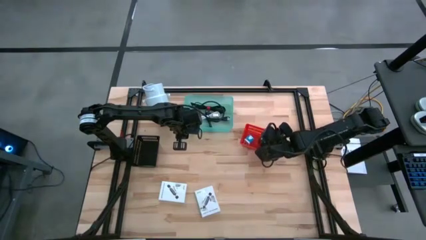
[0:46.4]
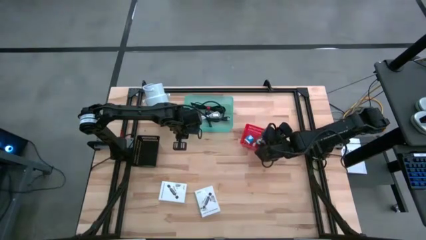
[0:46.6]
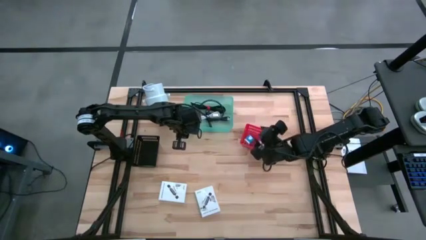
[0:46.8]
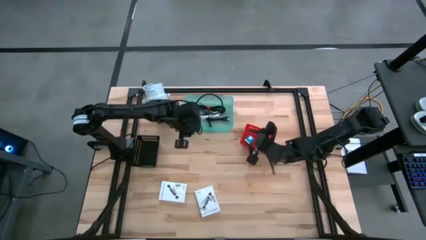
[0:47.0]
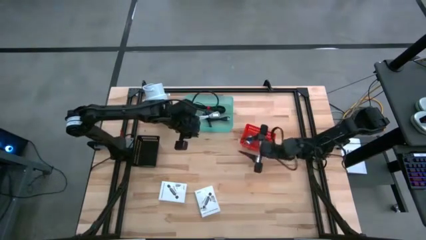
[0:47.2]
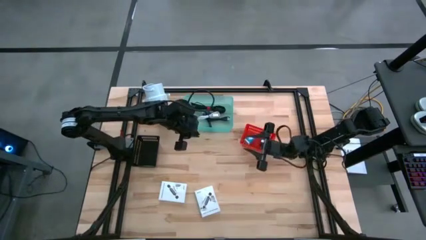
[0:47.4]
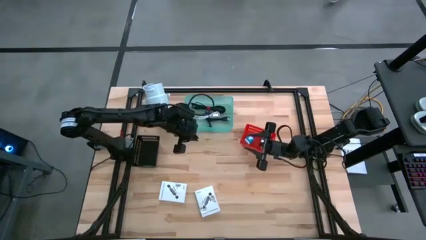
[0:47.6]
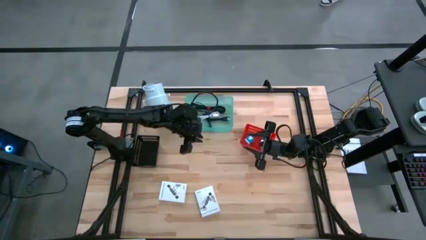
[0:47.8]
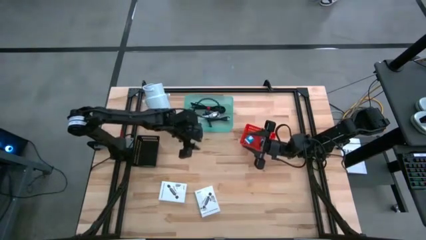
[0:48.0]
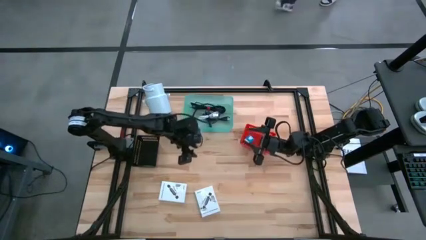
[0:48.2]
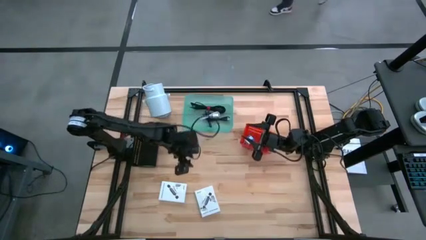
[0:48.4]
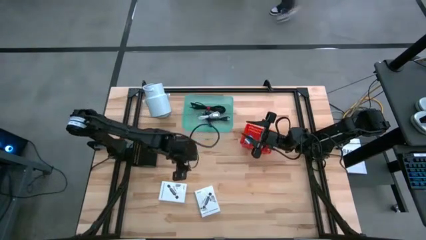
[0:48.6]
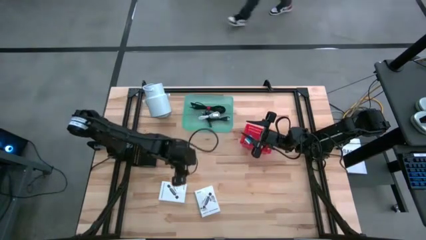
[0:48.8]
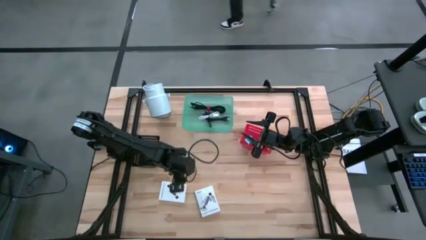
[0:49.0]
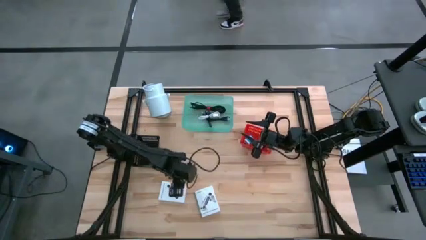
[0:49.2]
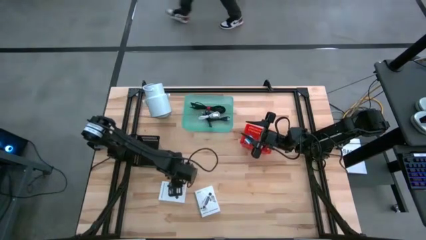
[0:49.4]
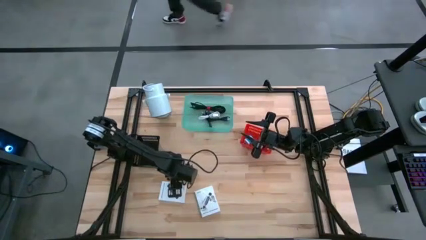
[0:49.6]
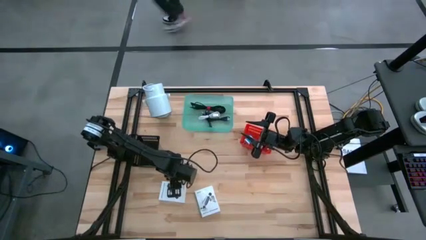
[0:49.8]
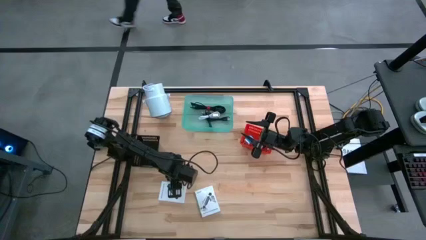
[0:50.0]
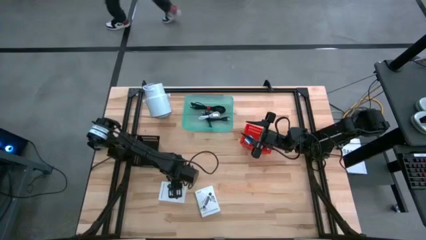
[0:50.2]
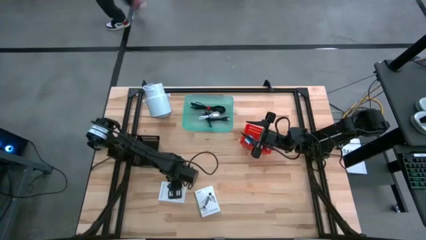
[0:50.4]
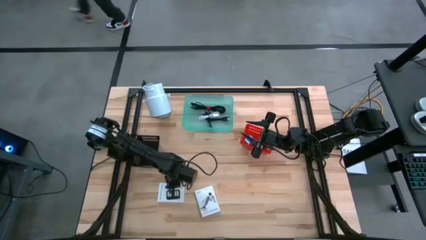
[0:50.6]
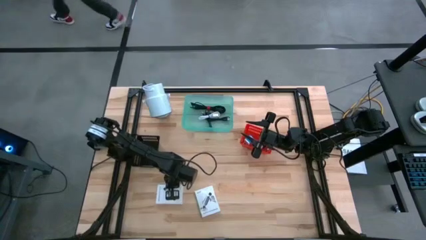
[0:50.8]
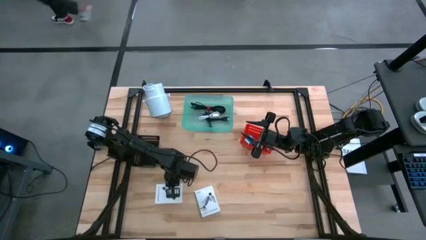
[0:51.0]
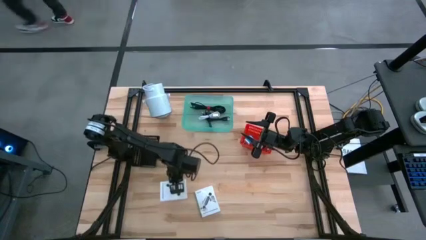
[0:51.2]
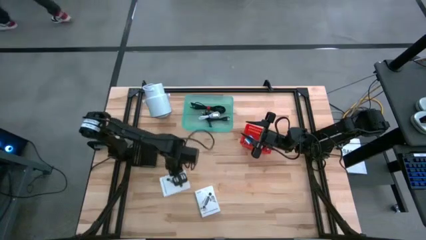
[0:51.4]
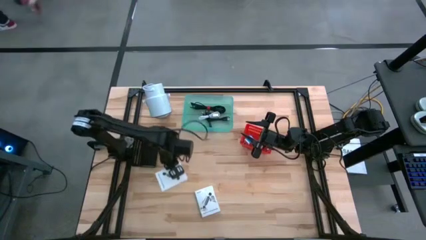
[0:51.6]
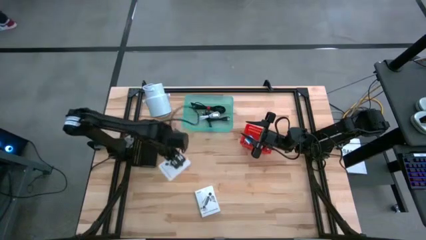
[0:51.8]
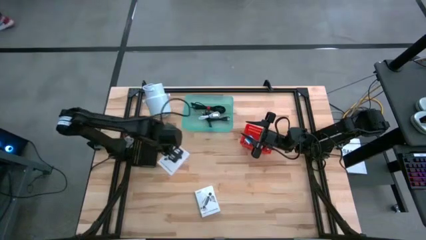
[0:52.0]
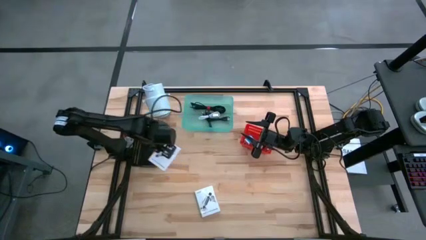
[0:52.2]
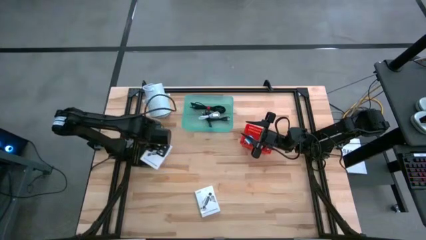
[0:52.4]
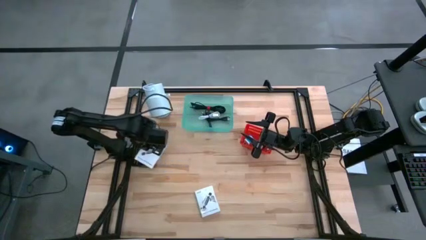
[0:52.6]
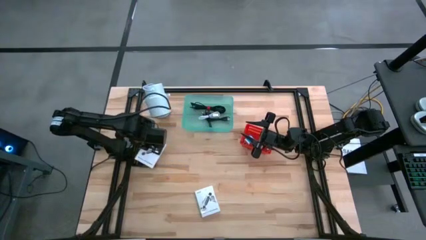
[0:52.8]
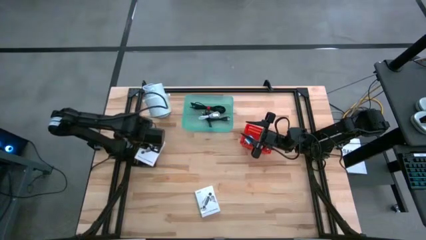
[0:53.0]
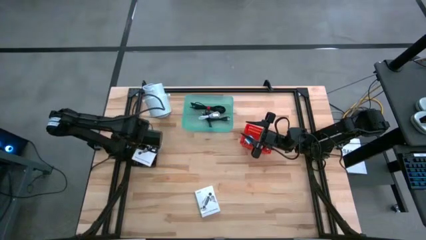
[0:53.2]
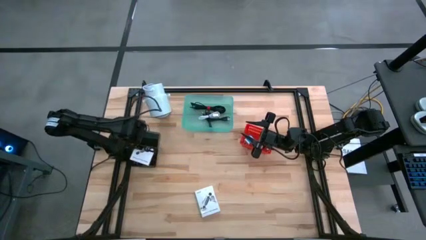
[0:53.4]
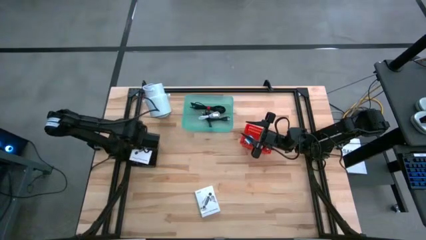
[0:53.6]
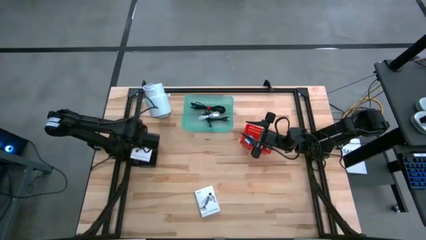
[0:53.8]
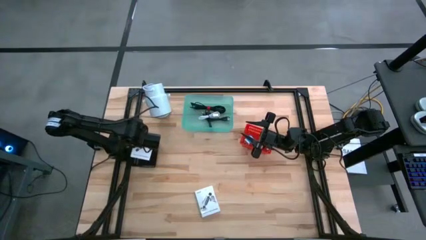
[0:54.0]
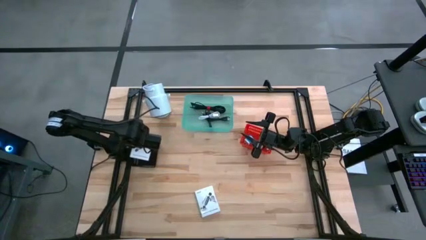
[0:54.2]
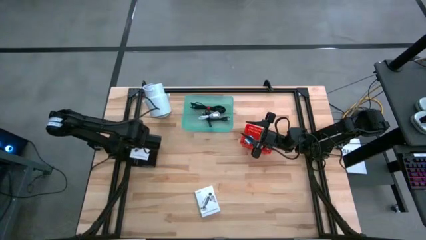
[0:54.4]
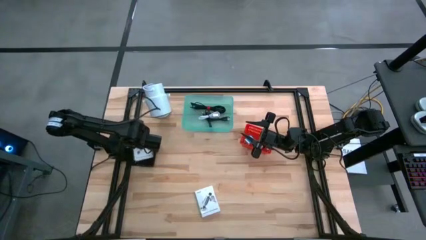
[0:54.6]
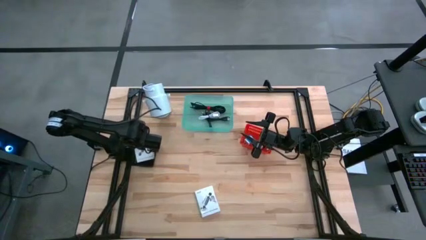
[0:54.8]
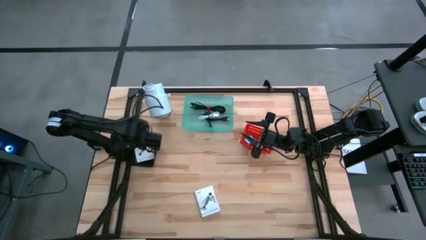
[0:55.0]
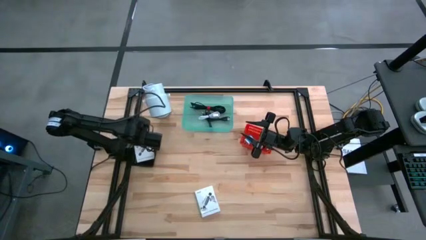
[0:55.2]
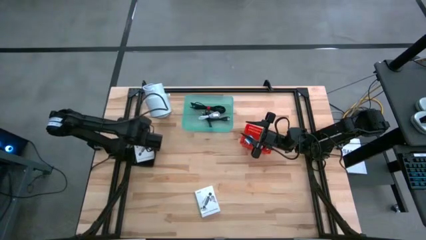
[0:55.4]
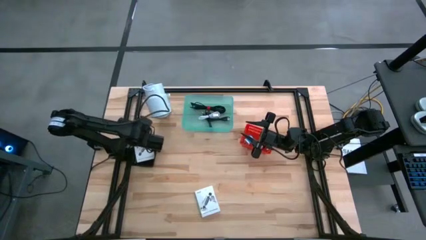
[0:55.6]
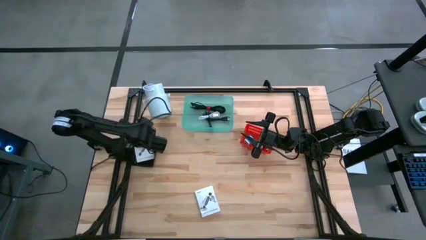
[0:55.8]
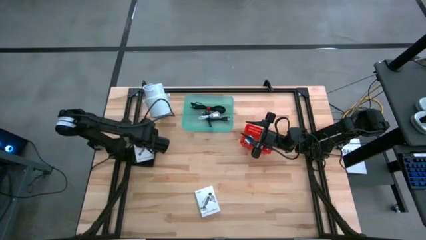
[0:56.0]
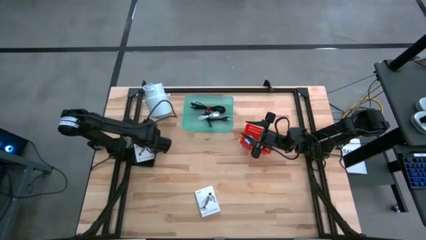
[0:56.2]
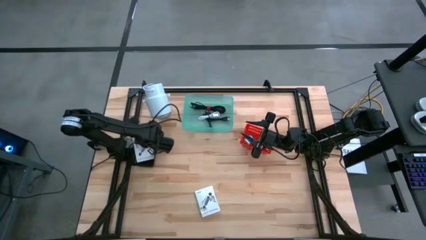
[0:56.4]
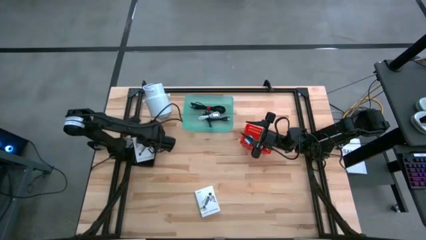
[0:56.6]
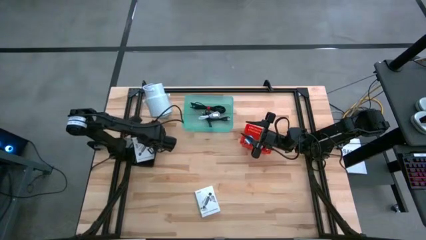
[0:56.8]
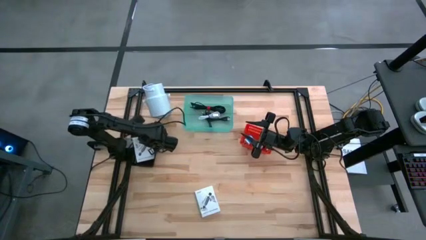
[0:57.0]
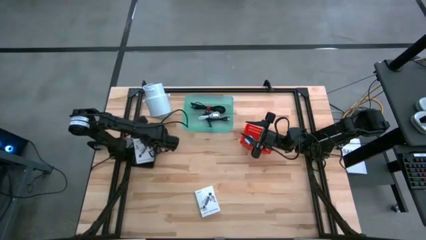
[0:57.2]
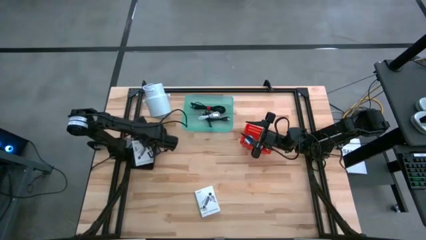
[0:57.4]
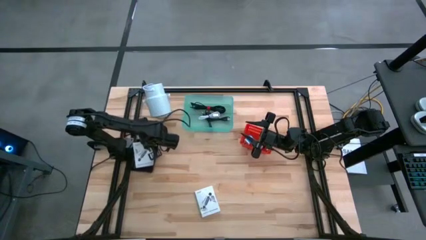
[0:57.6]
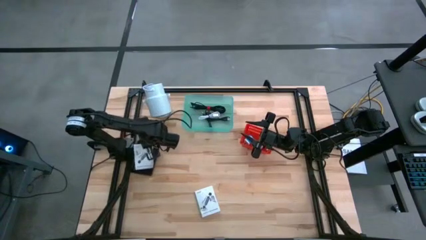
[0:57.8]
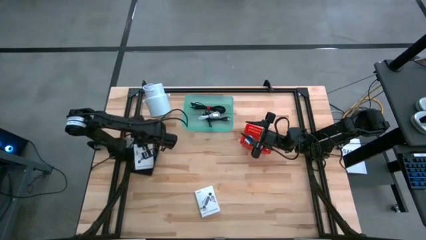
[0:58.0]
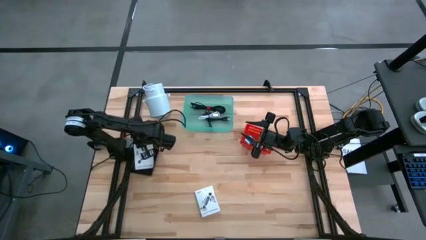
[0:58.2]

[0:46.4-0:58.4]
Task: Pick and place items into bin
Put the left card reader box into the black basket

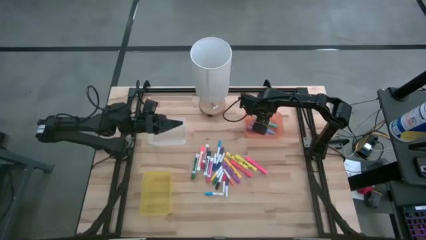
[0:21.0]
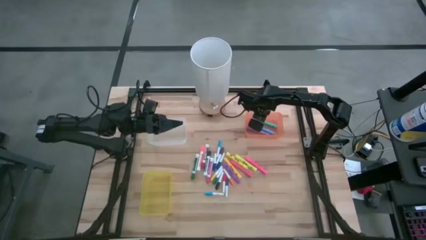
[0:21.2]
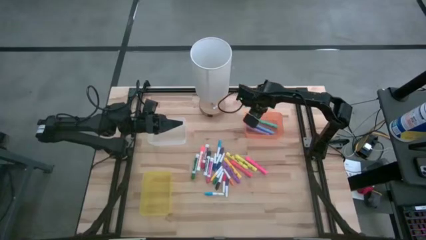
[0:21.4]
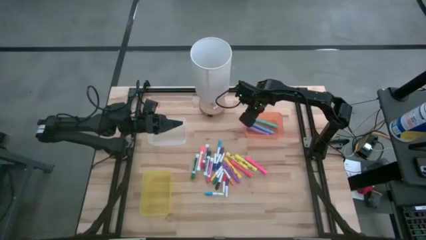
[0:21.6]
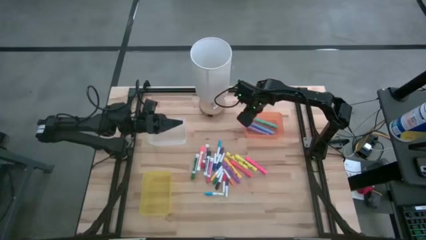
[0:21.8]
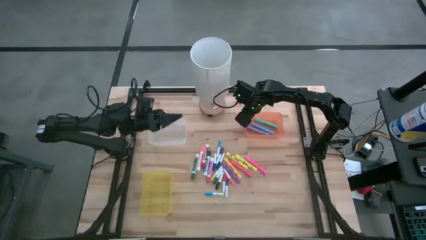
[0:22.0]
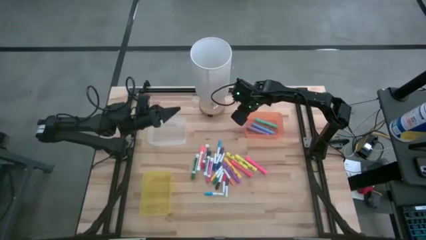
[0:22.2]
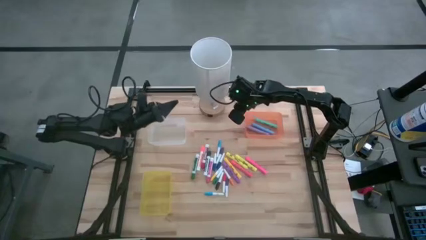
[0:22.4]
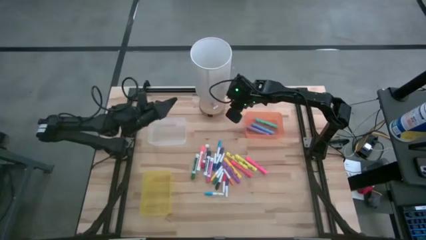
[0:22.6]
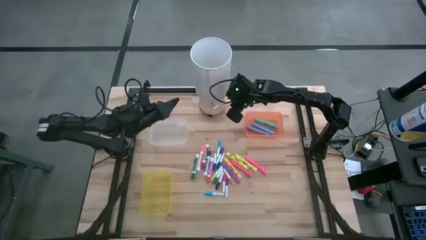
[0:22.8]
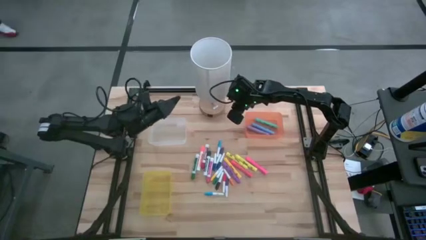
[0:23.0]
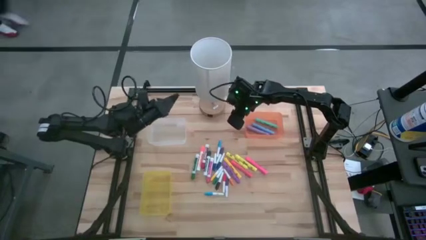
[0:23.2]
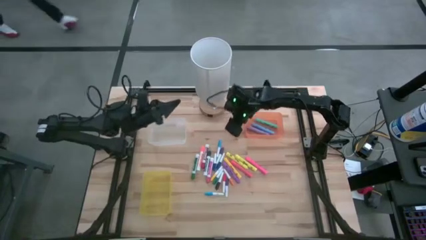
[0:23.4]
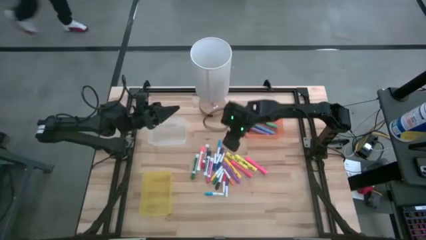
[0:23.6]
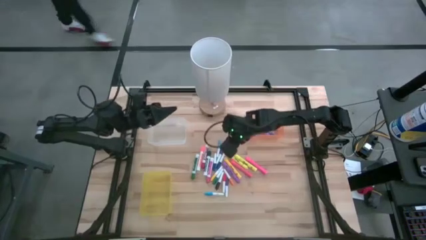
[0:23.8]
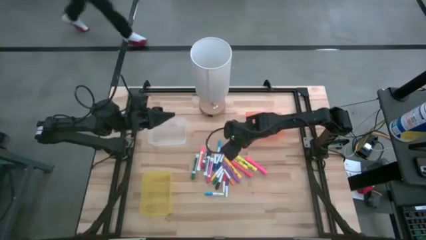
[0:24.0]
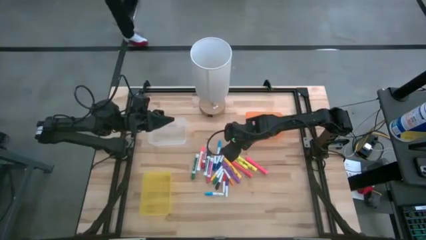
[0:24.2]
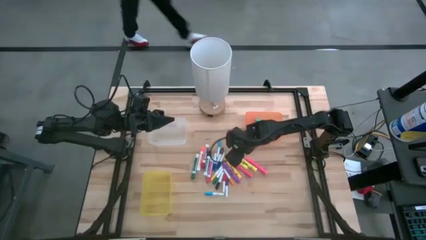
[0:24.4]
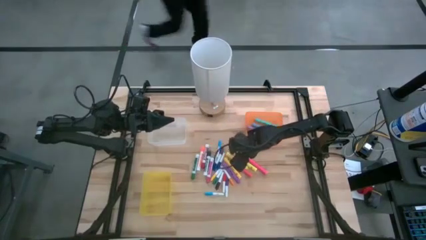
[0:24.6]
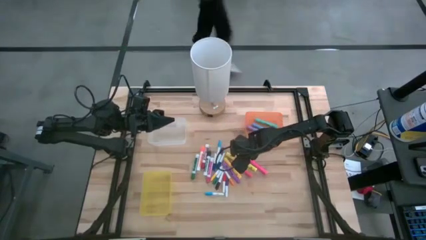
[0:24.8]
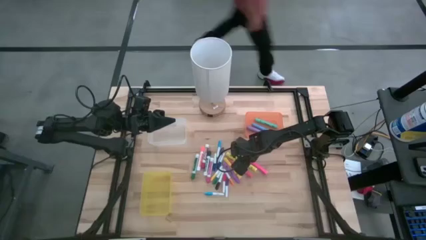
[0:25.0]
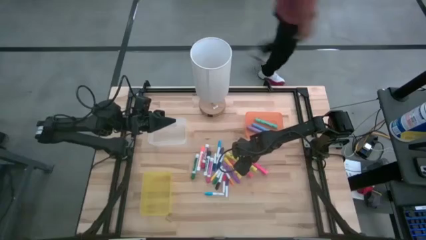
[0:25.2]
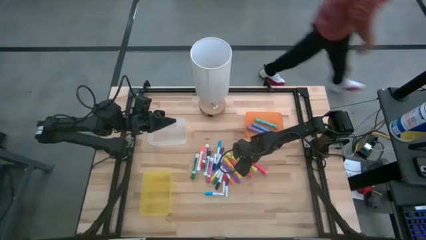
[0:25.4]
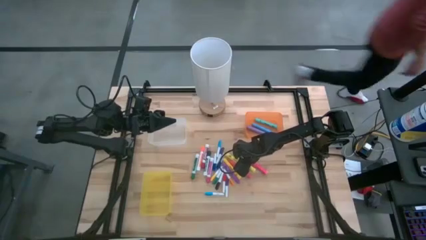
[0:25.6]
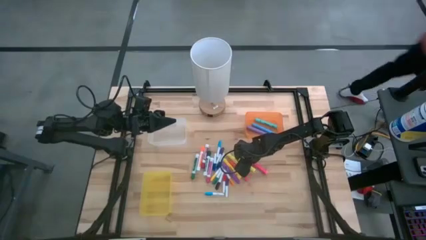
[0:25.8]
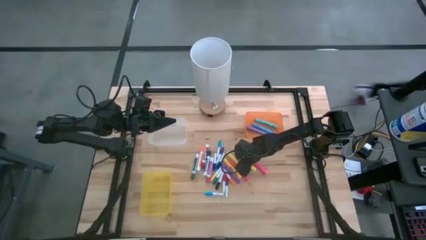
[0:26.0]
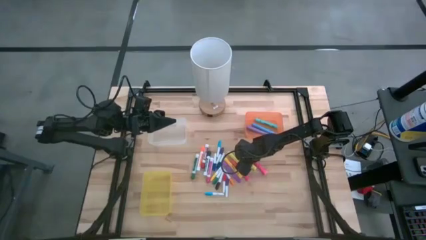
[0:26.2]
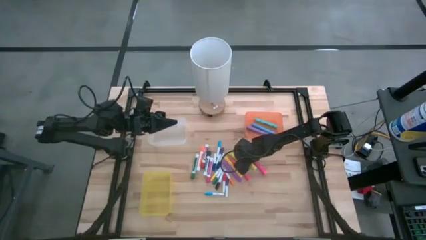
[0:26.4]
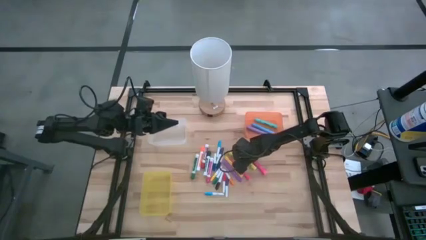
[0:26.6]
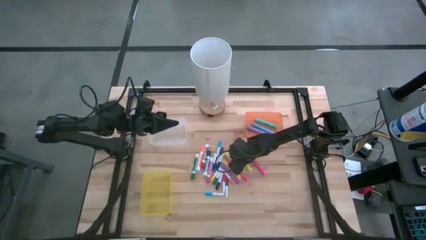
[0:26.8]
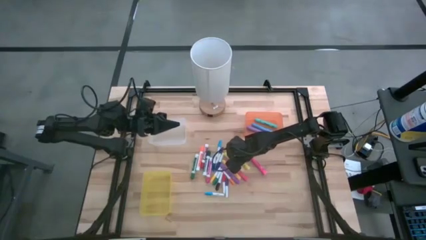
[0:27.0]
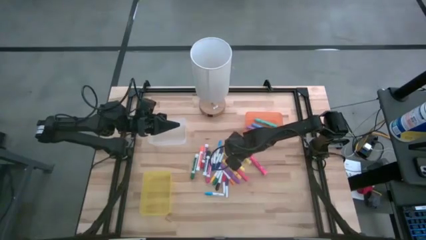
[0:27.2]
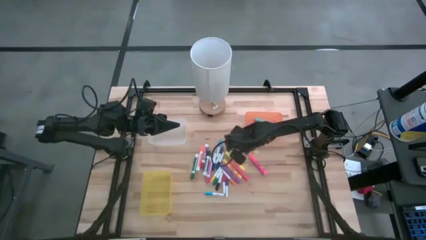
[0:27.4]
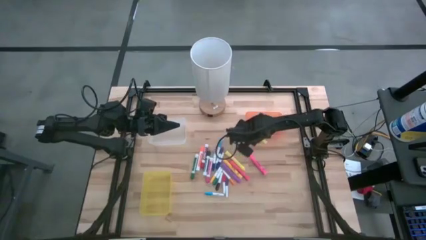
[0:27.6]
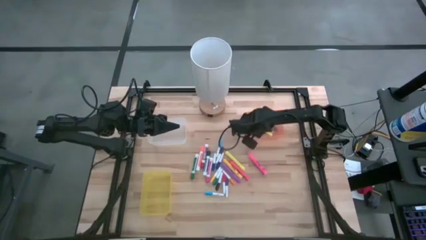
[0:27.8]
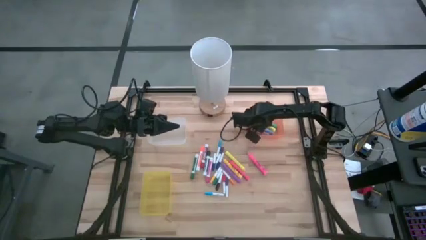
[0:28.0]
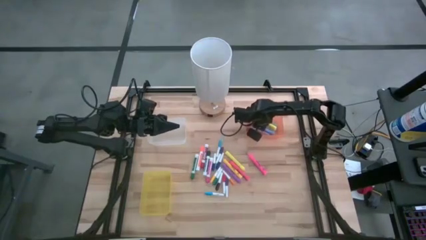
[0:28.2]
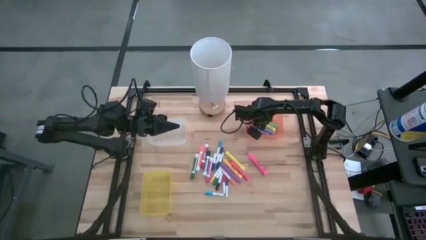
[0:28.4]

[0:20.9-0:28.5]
Task: Pick & Place Markers
Put the right light yellow highlighter pen into the orange bin
